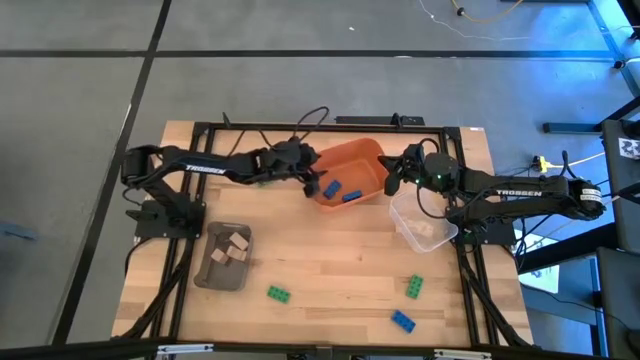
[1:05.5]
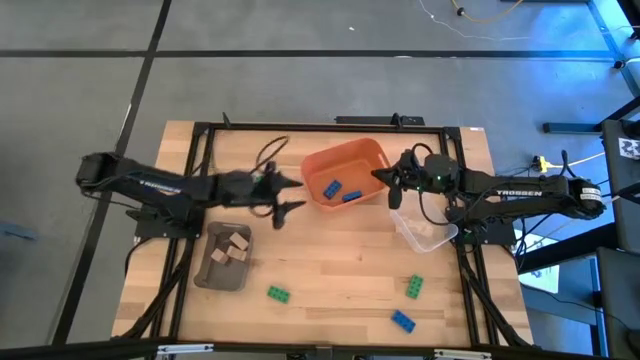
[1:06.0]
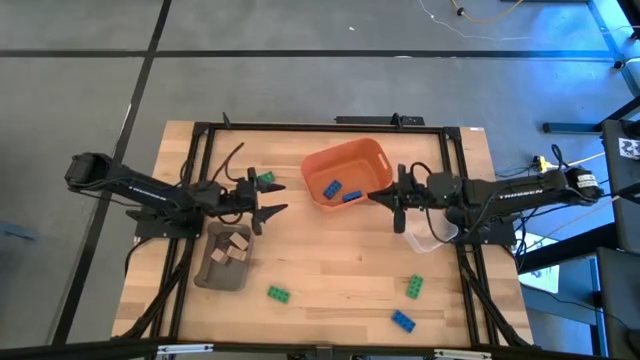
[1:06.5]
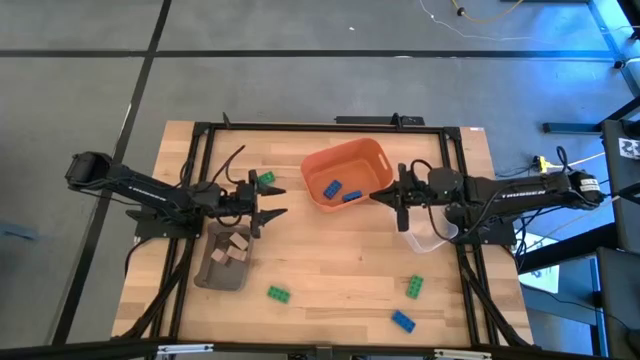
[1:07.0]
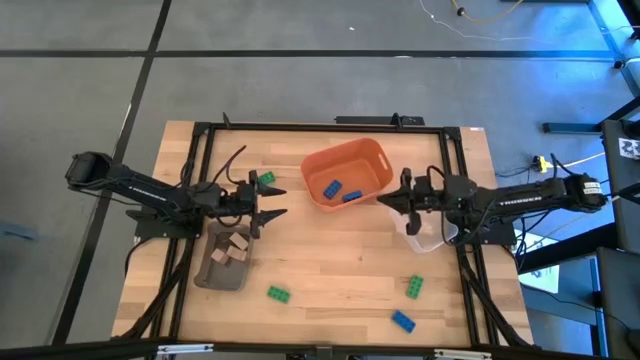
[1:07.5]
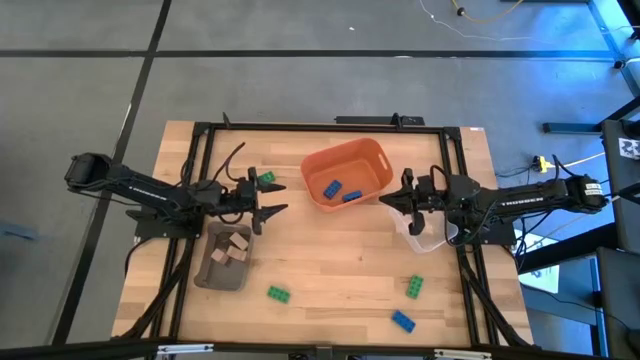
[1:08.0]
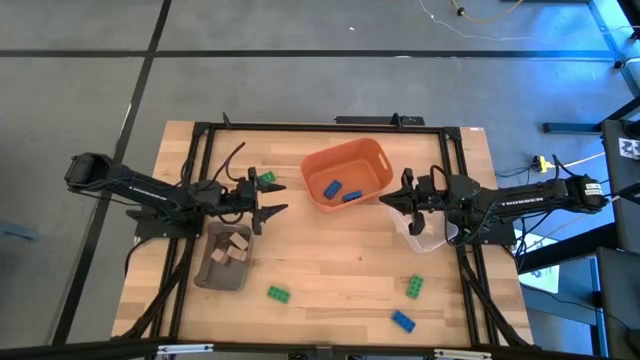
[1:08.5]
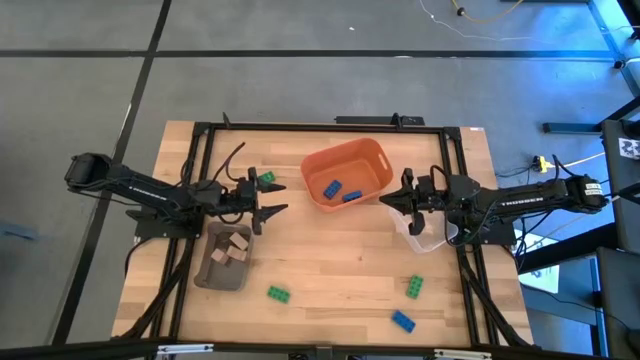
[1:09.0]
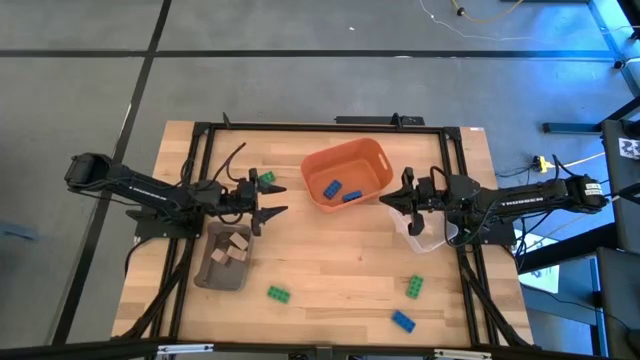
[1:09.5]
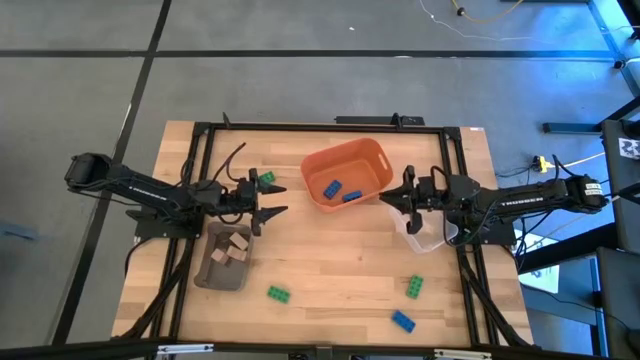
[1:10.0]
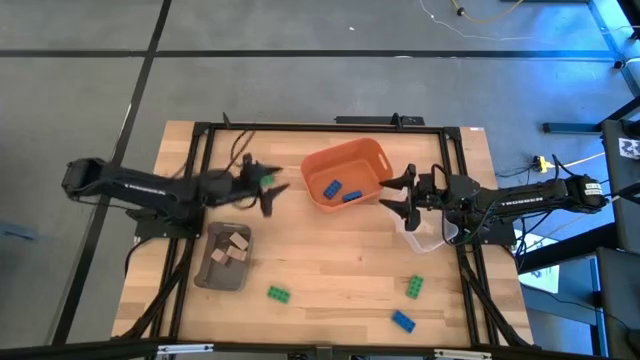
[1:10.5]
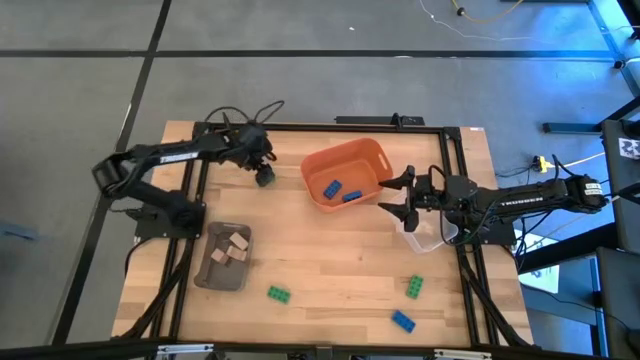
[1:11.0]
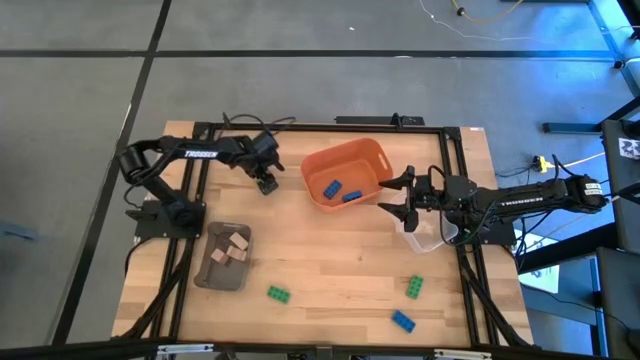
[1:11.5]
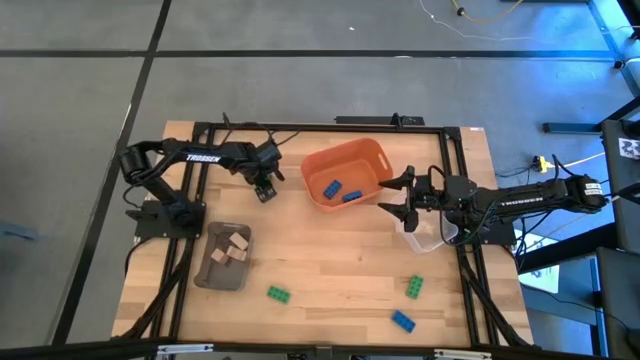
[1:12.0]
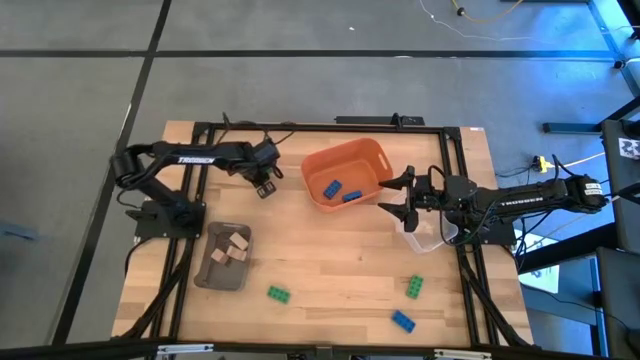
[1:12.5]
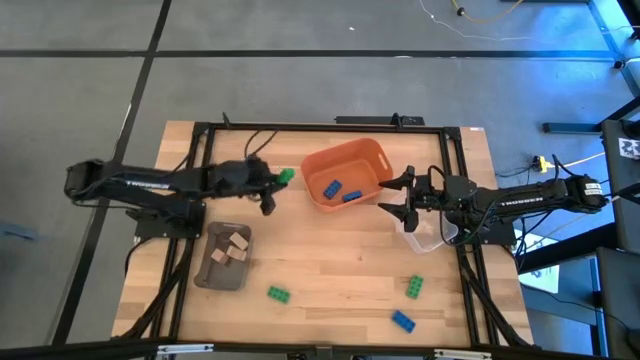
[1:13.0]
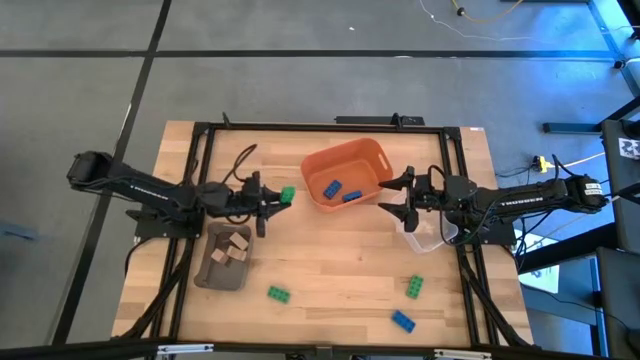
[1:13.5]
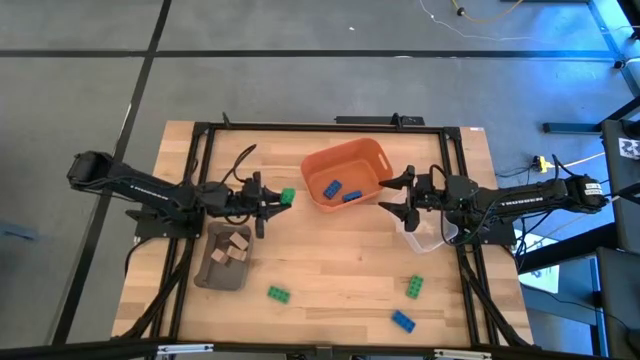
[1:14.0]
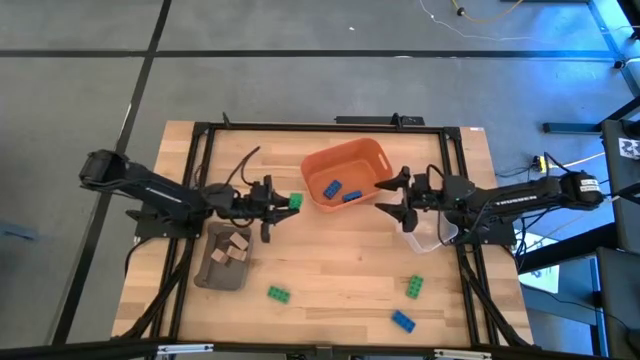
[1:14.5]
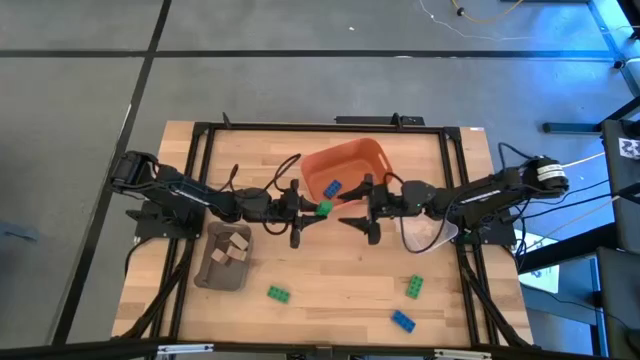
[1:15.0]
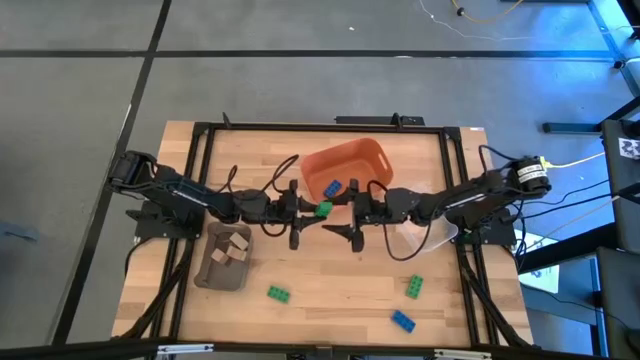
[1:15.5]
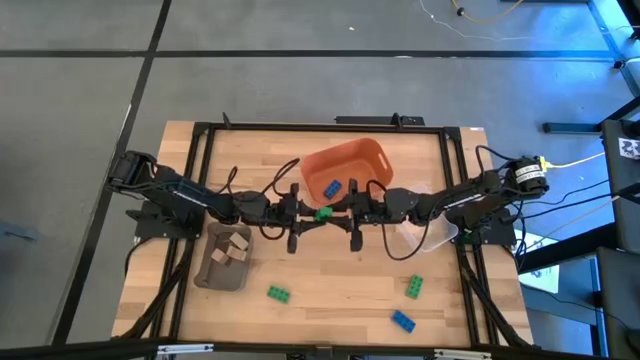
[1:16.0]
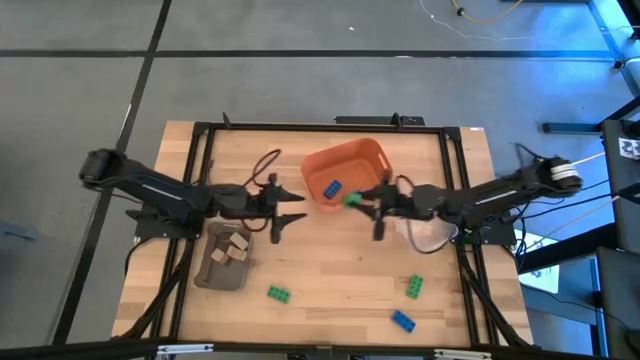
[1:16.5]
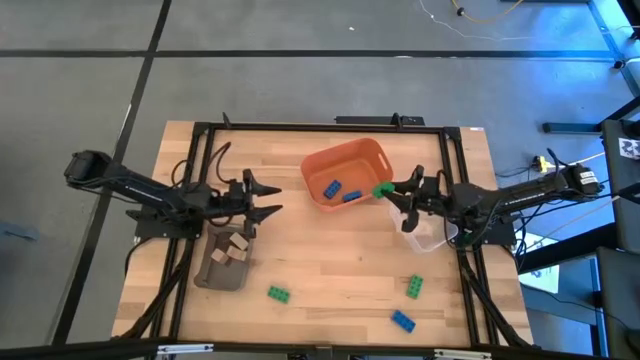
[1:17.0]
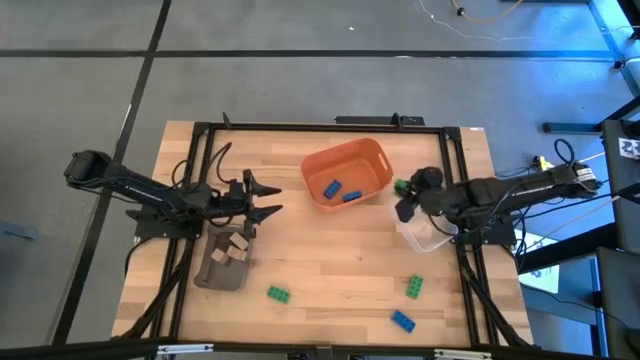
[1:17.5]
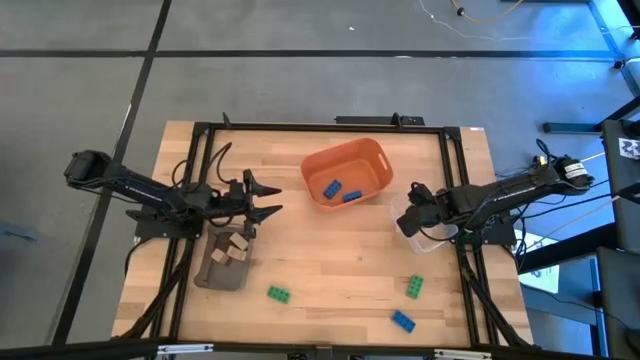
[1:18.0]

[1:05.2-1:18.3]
Task: Sort & place blocks by color
Put the top green game piece into the transparent bin

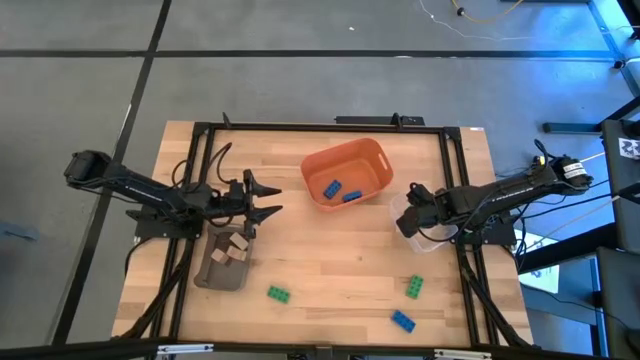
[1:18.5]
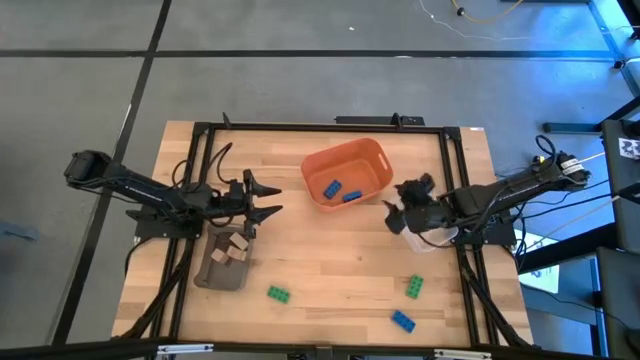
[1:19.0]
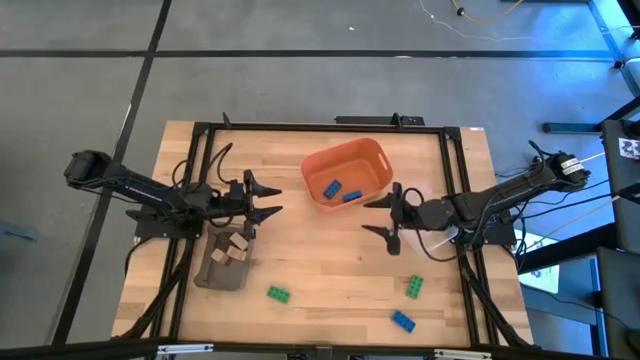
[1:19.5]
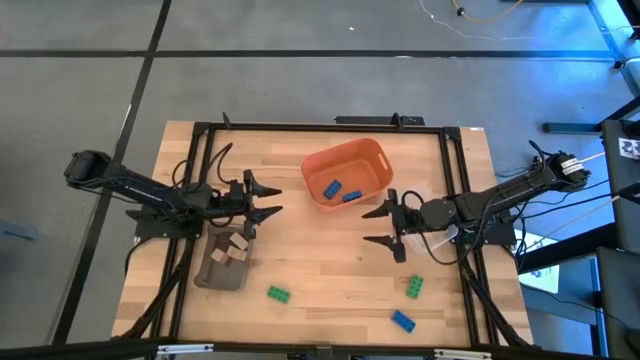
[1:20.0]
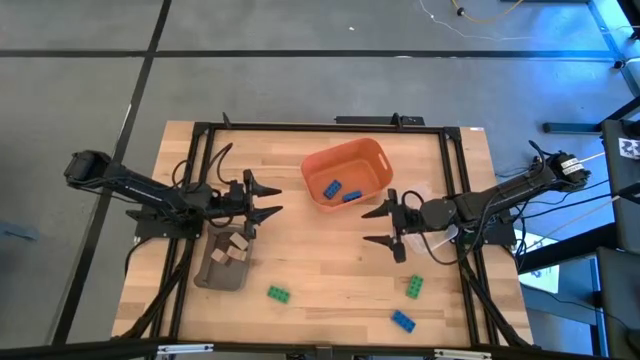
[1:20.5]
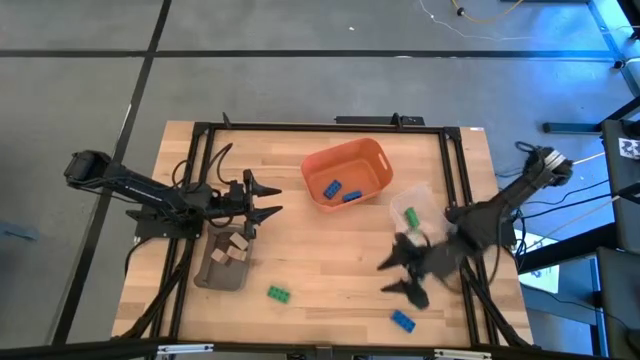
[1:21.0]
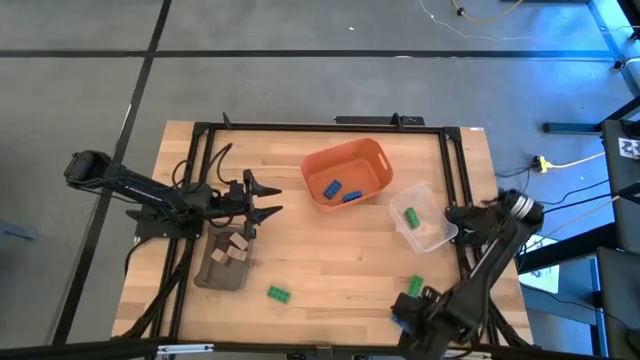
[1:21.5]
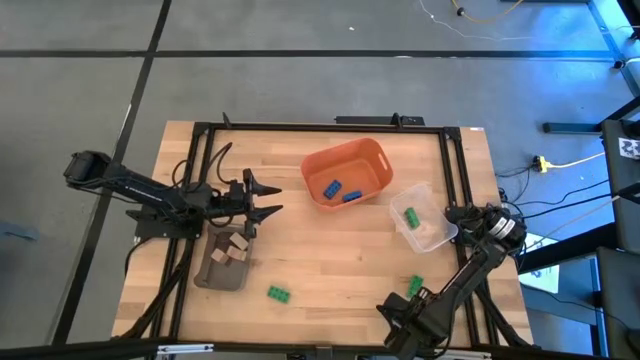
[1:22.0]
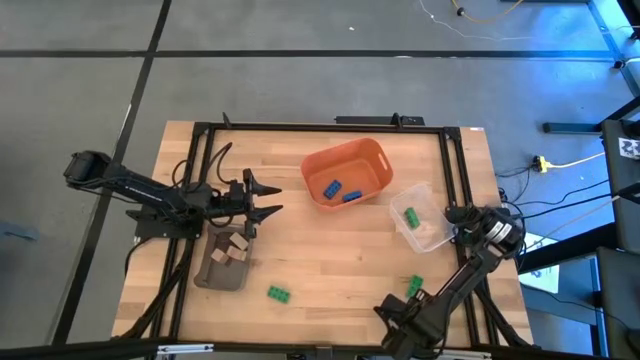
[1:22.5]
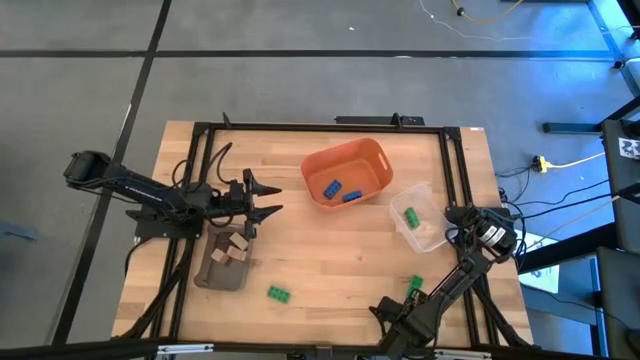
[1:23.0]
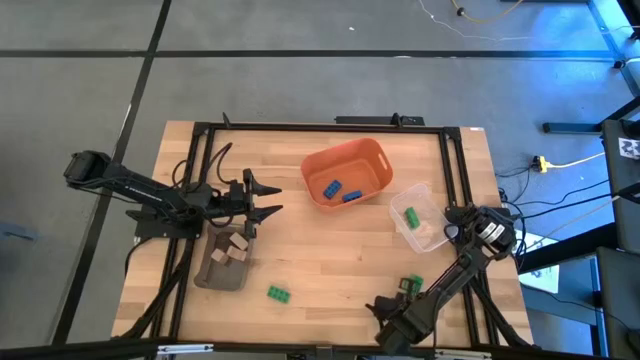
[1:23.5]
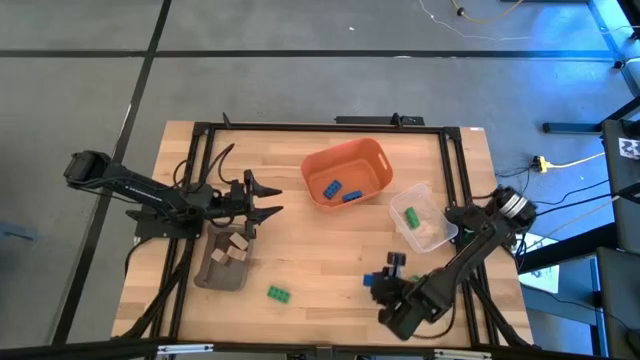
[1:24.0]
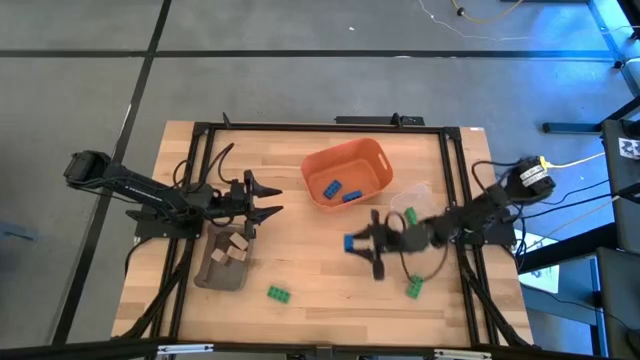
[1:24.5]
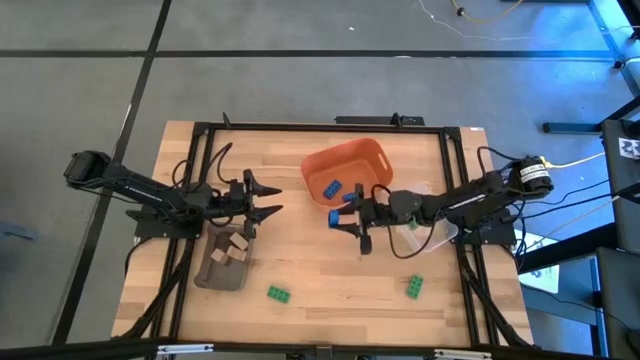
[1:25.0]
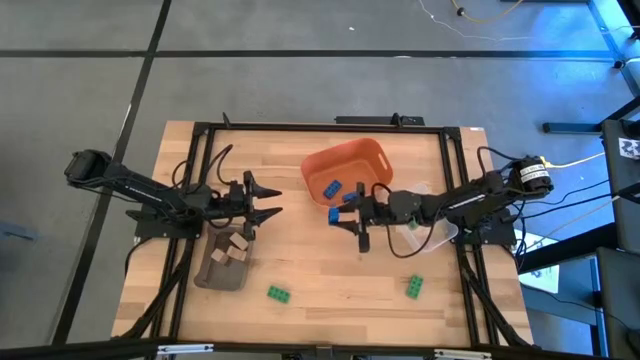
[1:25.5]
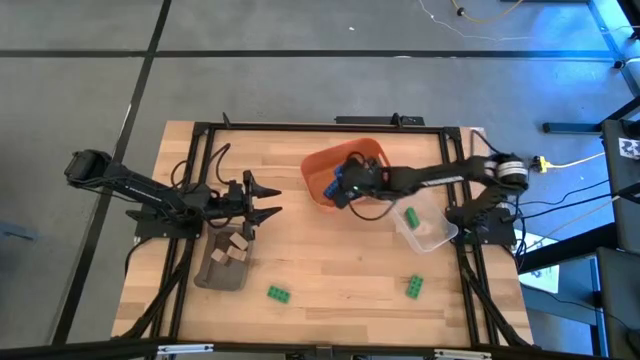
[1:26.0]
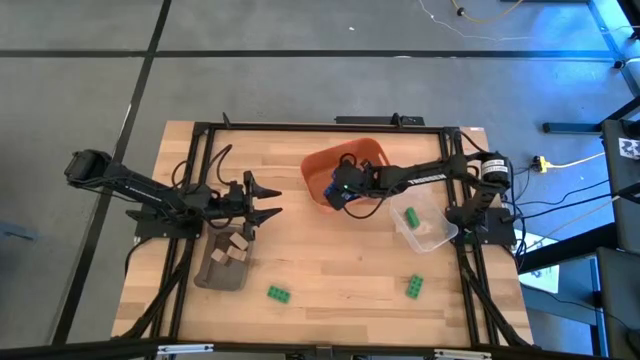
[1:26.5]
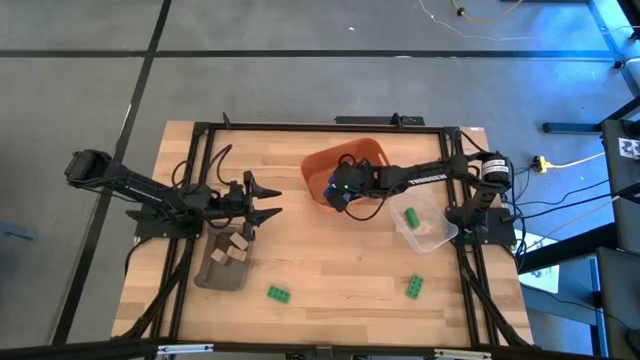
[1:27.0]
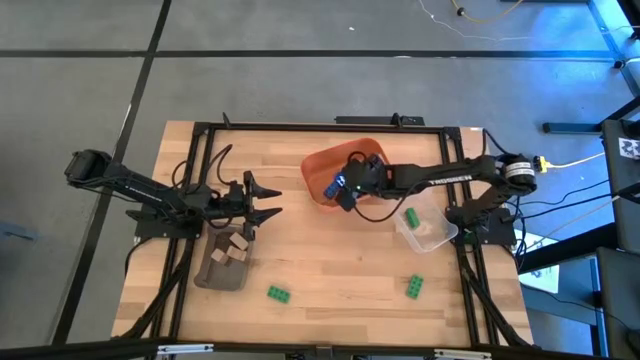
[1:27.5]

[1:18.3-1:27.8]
Put the blue game piece into the orange bin
